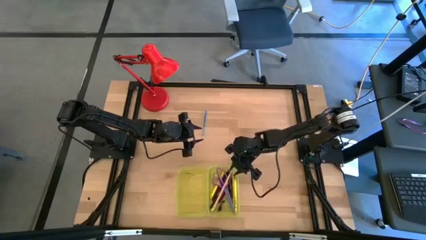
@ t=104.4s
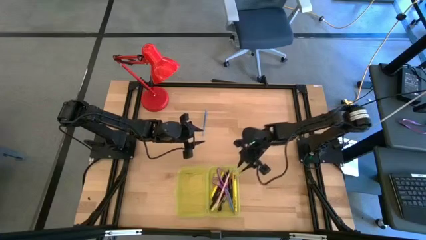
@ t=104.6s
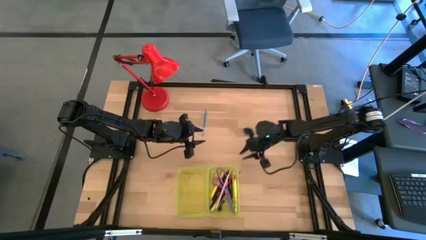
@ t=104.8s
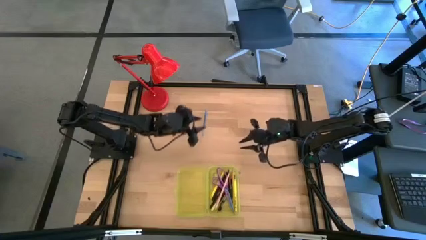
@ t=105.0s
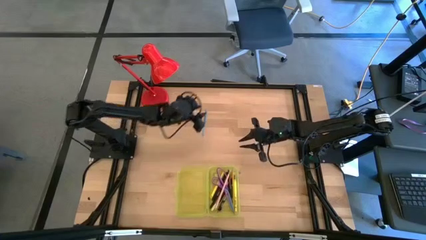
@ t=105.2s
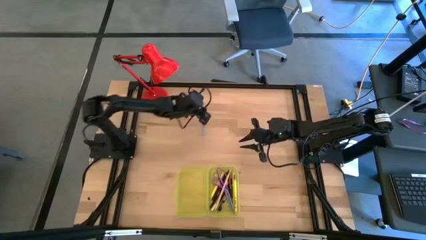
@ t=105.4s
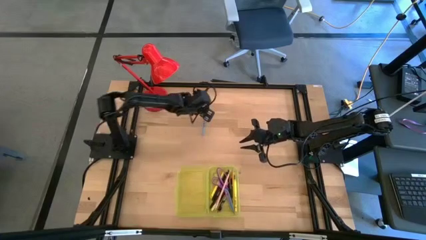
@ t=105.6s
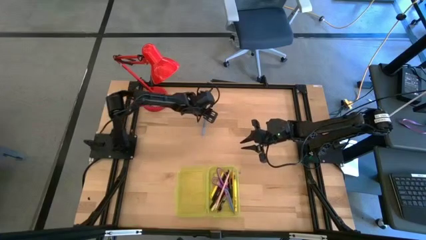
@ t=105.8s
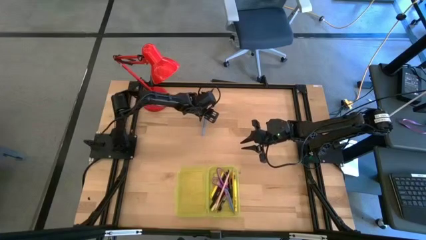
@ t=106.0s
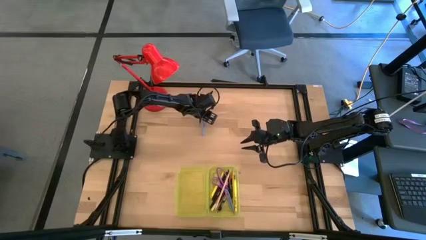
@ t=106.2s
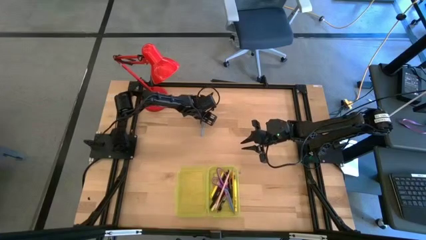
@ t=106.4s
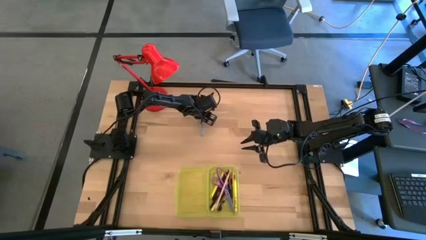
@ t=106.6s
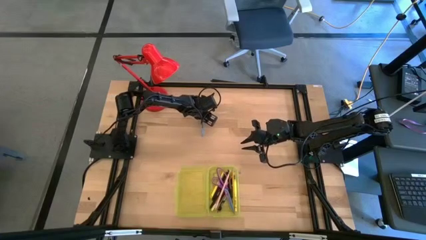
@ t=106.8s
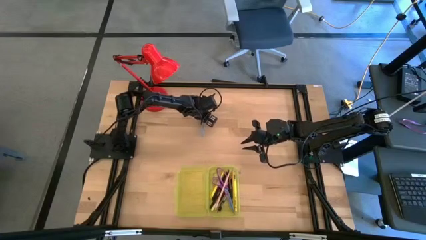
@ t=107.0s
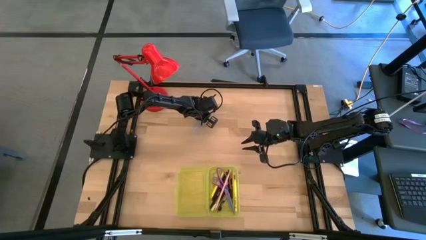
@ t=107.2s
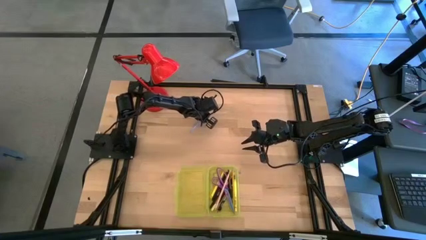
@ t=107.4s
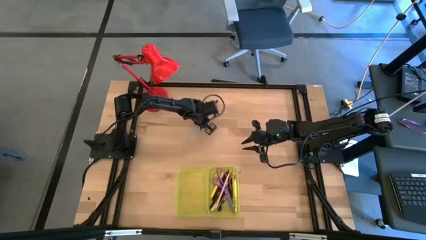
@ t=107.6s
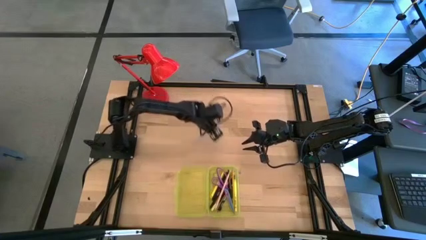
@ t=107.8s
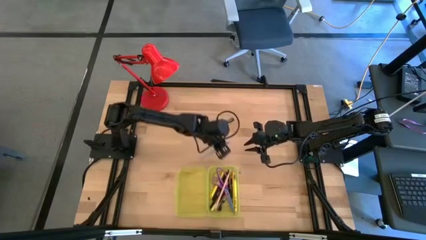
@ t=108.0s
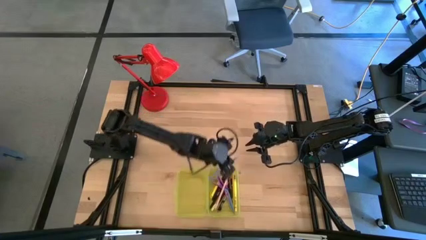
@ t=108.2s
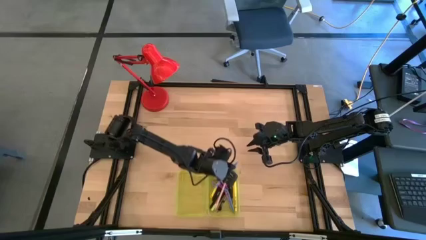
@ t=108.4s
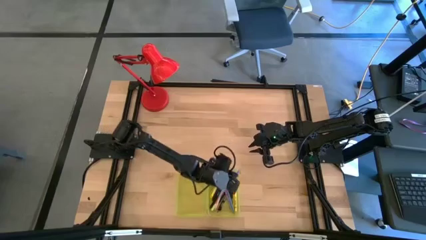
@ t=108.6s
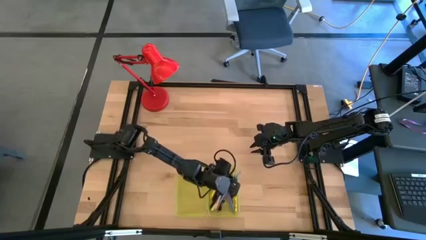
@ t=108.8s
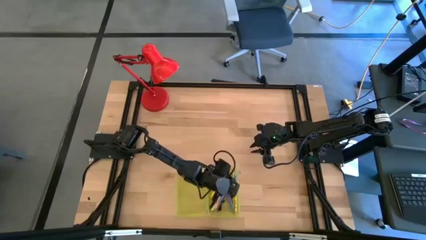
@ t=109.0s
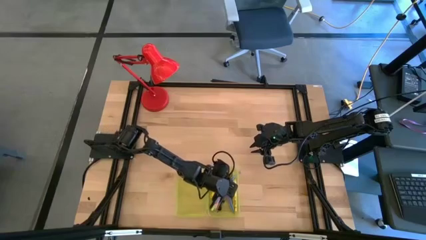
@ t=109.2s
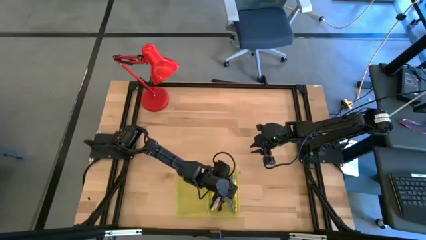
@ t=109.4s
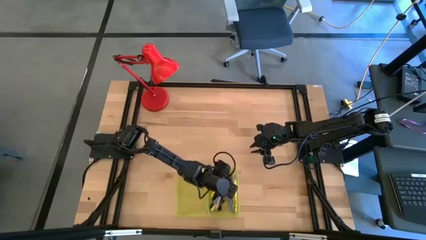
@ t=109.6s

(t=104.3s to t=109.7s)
Task: Pick & place school supplies into a supply box
Put the blue pen into the yellow supply box

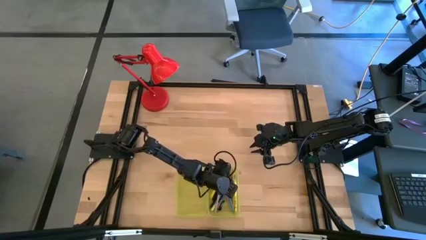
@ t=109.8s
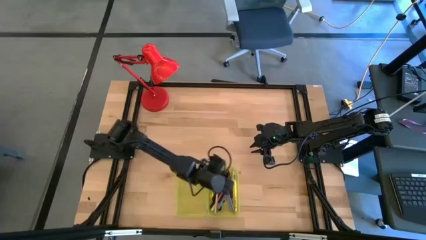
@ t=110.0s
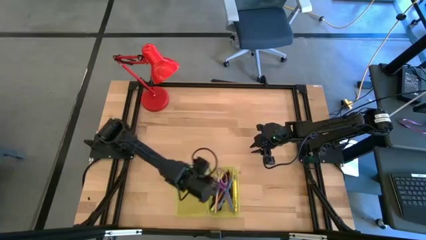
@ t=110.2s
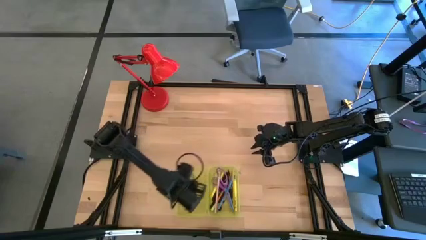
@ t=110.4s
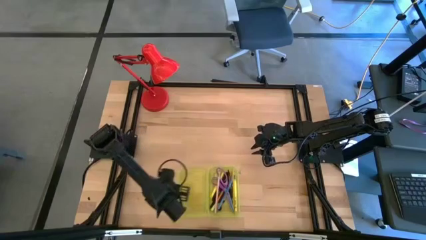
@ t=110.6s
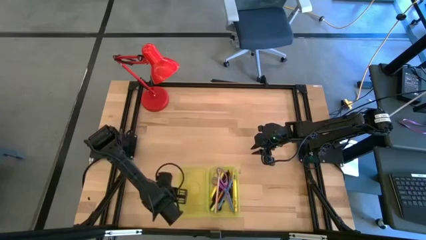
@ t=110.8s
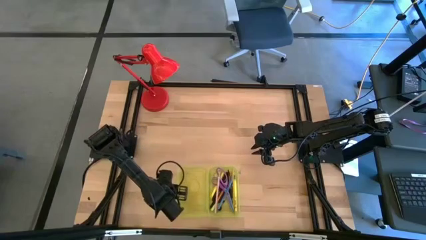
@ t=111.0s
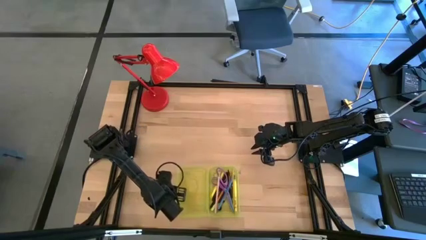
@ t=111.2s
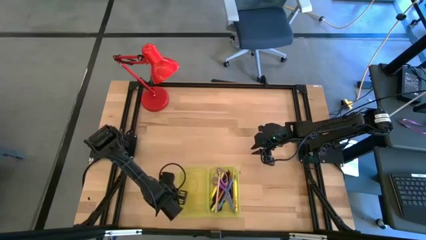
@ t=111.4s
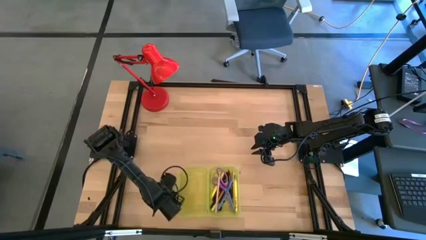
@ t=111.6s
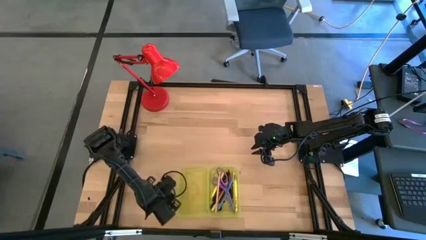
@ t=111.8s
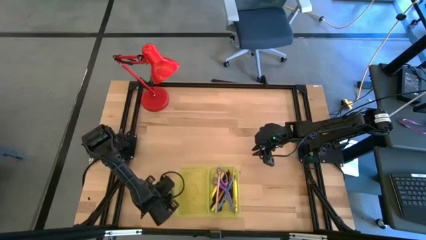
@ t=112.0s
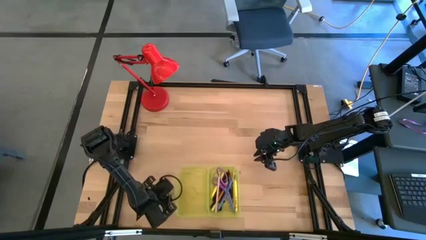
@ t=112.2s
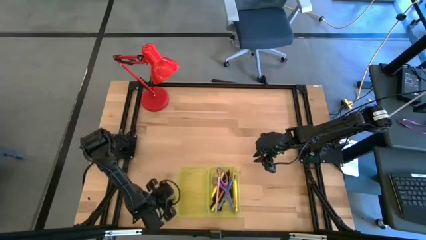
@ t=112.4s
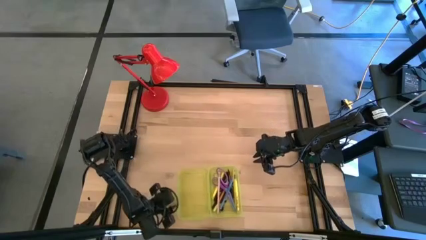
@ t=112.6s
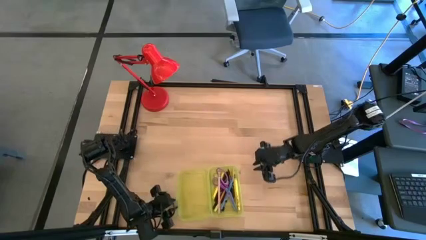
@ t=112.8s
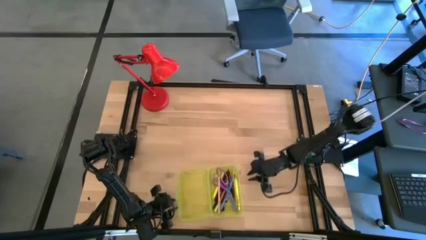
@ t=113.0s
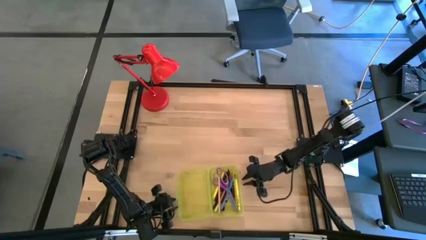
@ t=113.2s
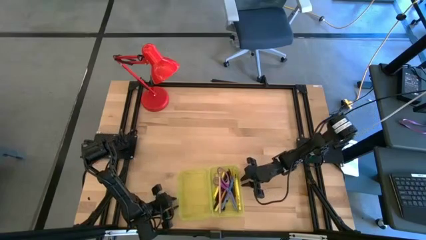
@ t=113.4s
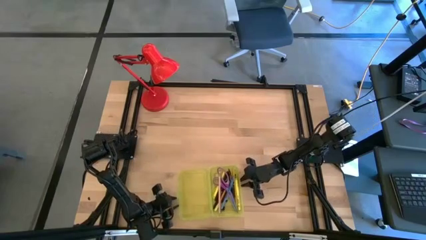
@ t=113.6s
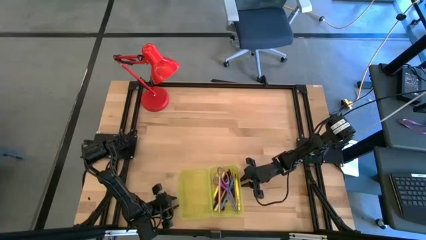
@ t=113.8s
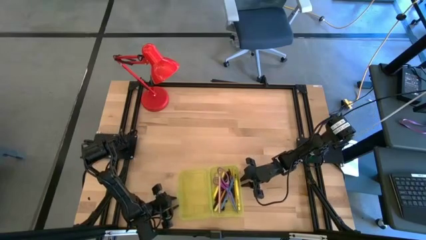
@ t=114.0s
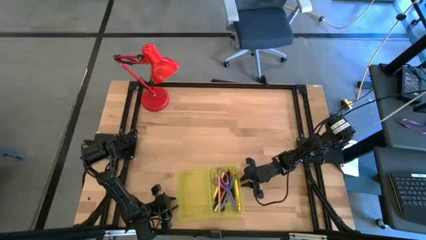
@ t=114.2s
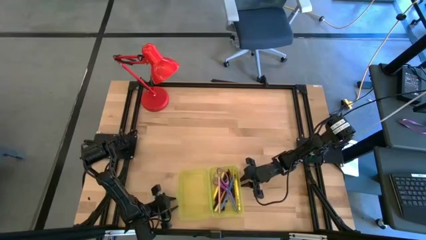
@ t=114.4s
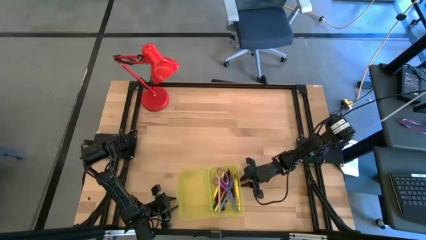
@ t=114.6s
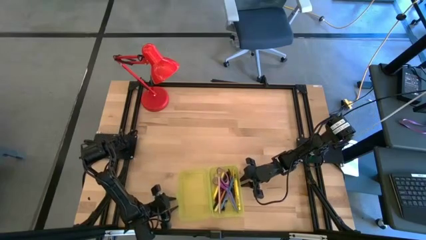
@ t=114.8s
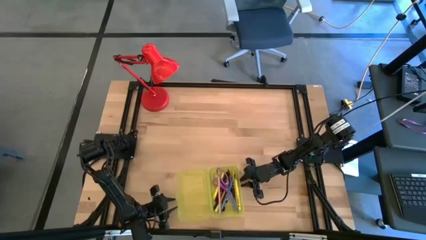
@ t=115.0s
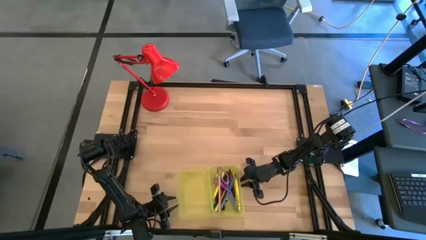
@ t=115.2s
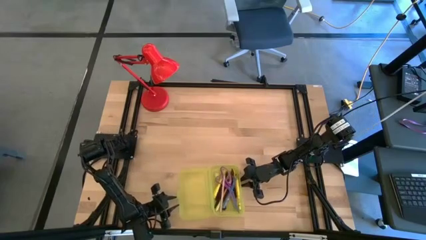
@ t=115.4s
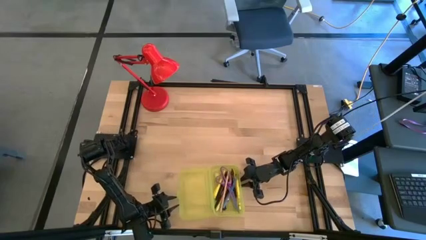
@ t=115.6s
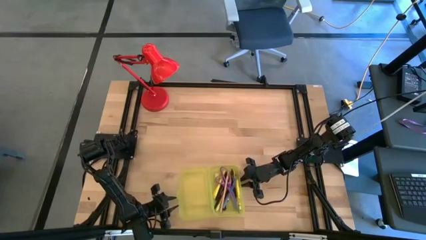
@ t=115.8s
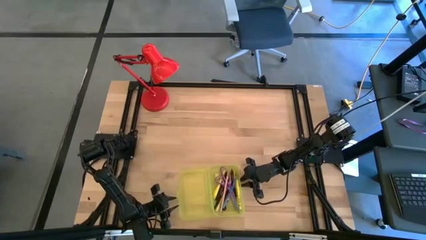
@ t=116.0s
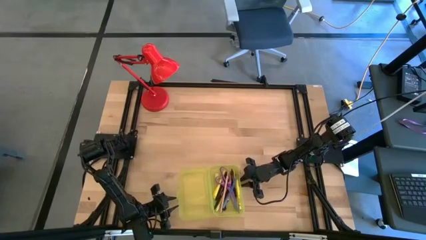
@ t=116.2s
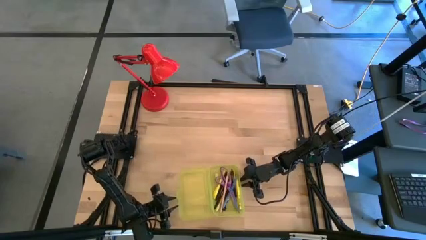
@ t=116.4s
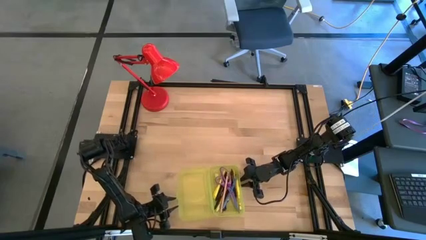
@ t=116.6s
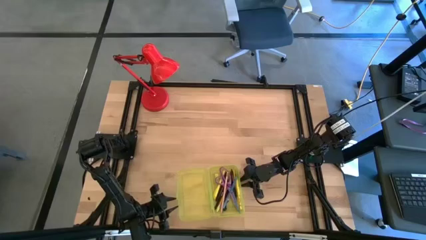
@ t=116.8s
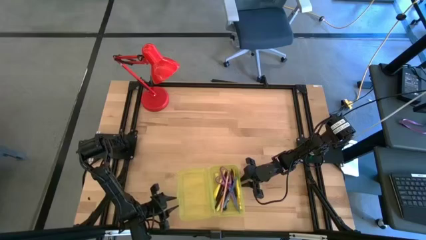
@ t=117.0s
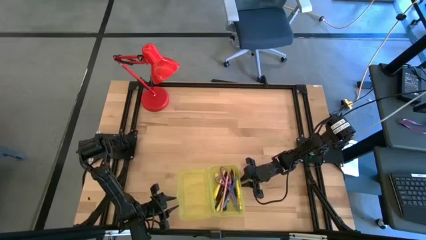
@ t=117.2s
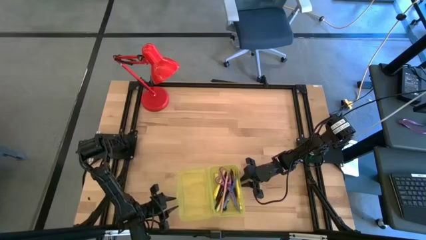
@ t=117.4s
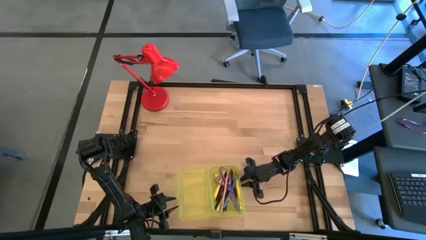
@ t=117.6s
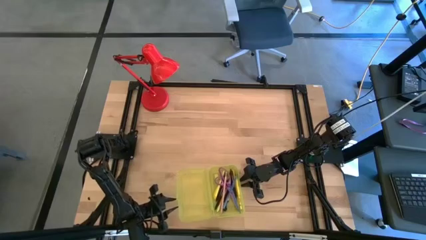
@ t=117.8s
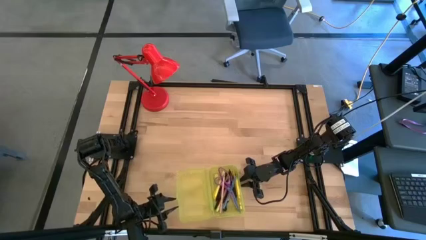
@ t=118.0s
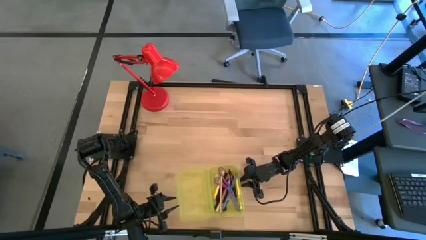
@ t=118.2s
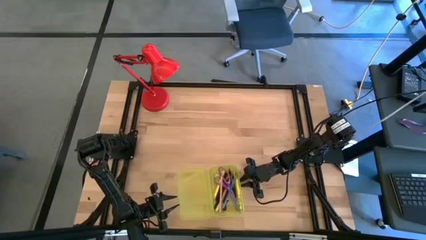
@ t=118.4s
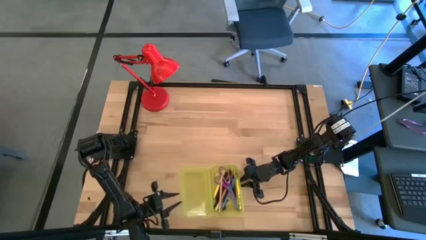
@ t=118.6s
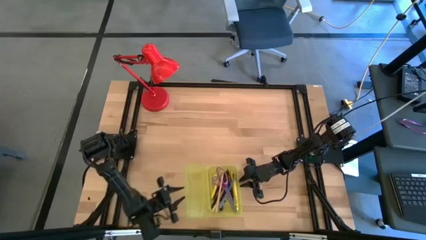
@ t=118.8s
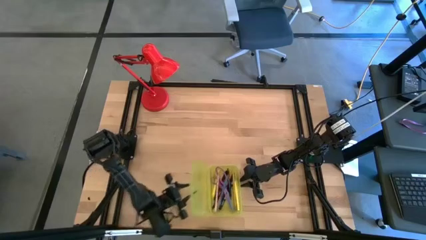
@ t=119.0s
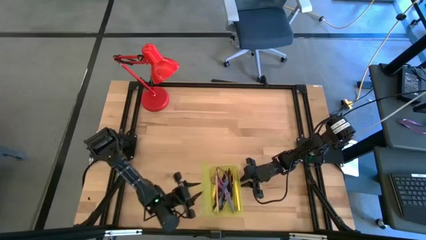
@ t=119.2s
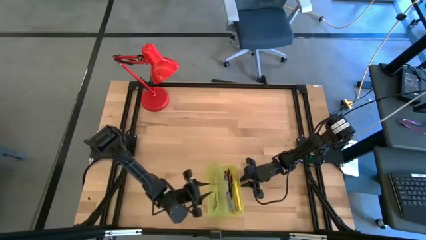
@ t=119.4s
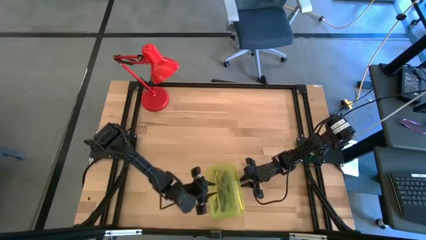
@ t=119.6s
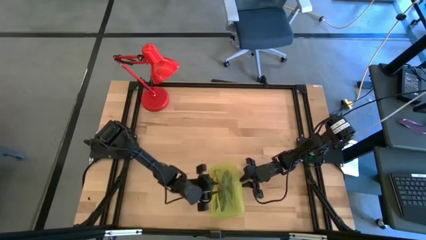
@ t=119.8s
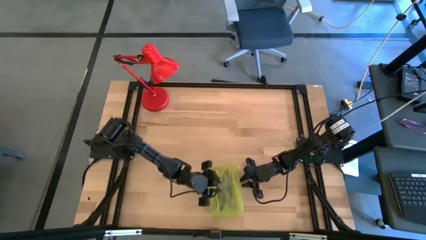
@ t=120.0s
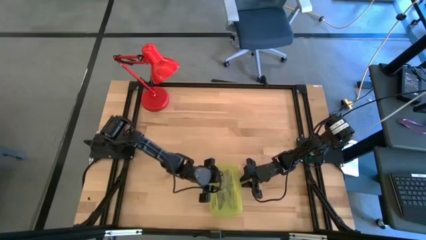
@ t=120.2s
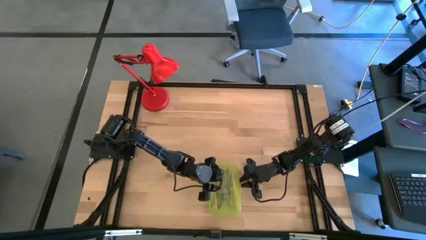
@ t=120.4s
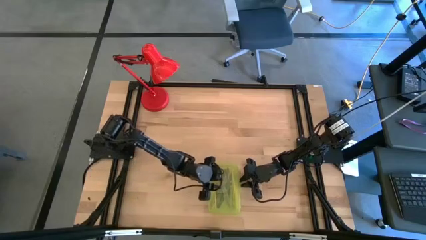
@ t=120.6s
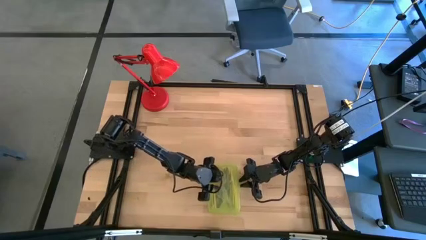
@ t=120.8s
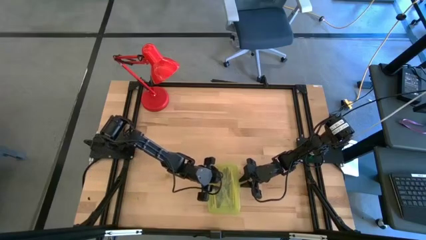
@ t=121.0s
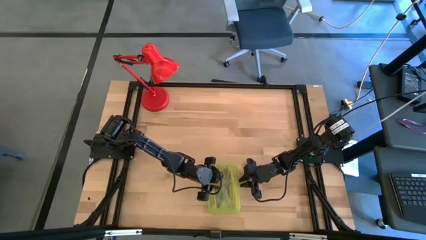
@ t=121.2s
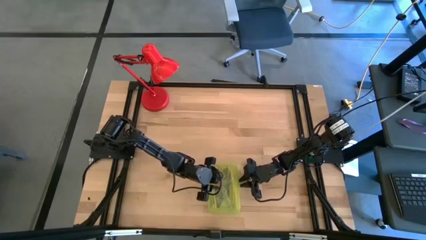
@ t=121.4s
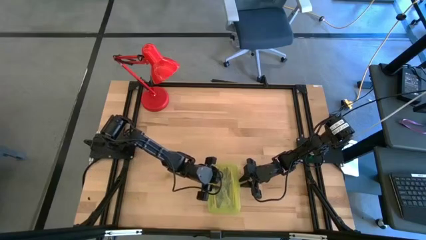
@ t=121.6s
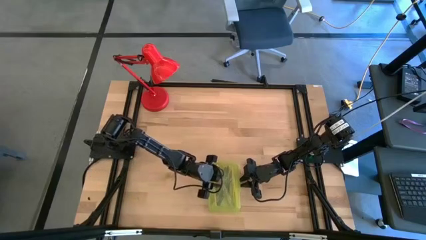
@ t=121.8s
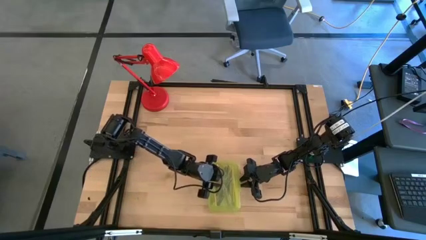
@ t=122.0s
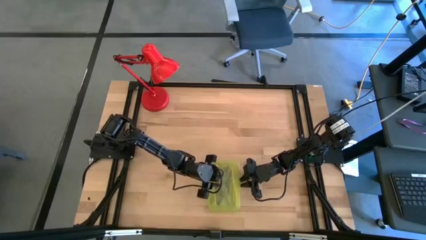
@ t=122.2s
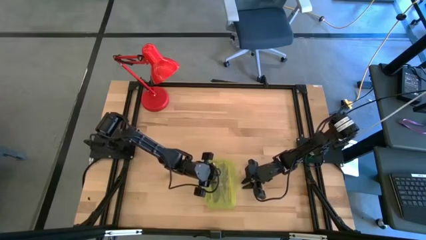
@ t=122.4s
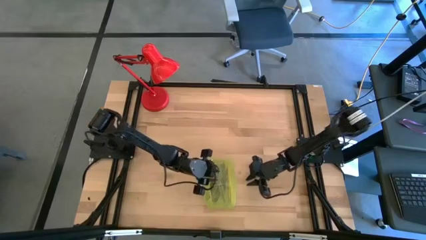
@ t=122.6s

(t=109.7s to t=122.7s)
Close the yellow supply box
